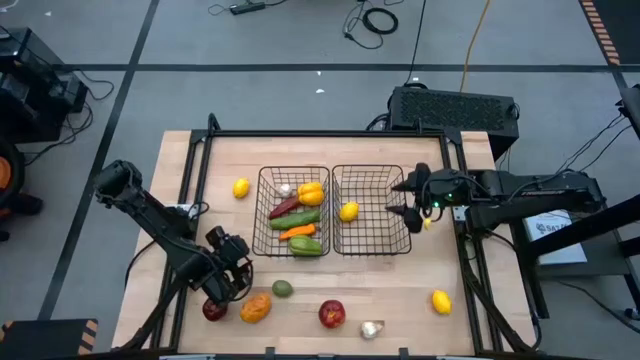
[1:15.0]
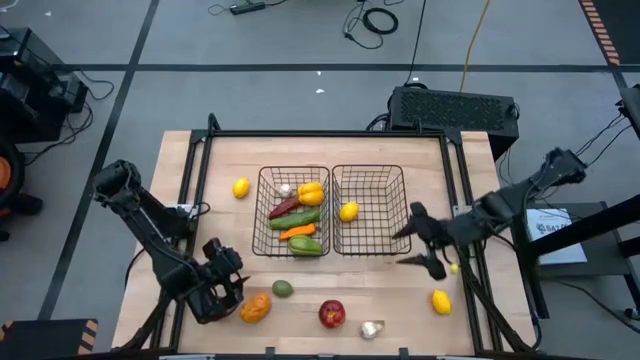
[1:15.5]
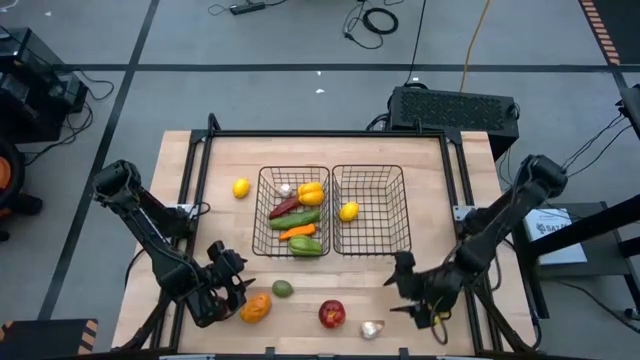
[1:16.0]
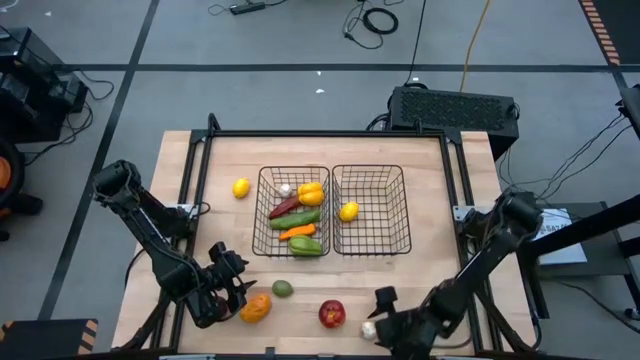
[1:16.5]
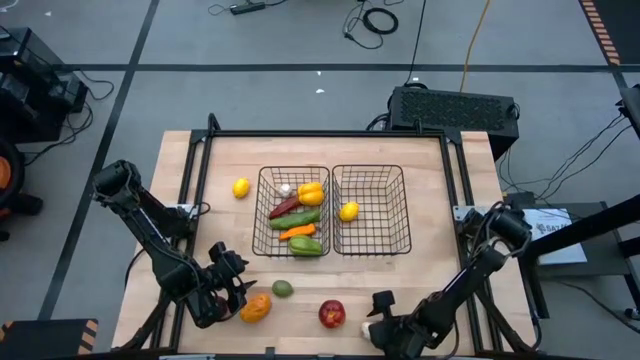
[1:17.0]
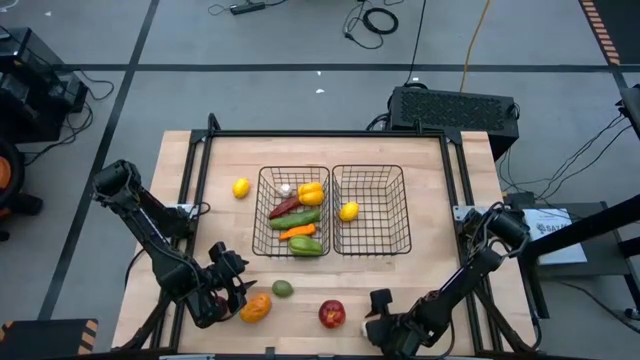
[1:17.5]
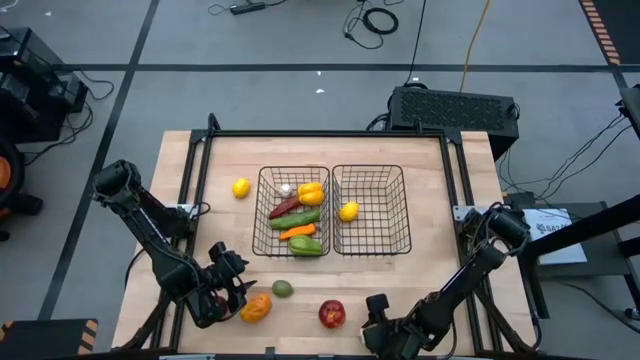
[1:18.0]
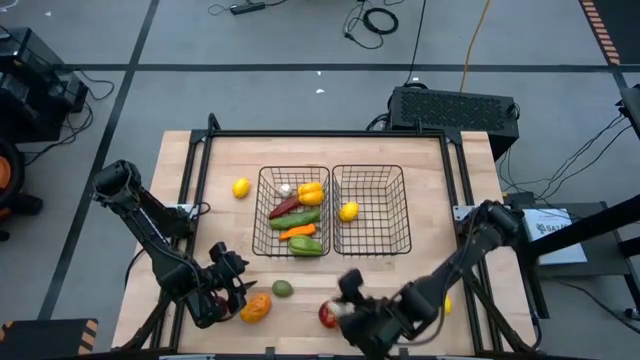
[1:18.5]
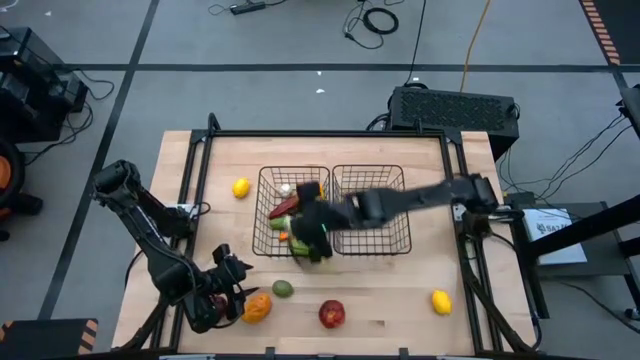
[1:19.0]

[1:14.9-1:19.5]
Task: Sort produce into baskets
Put the white garlic into the left black wire basket

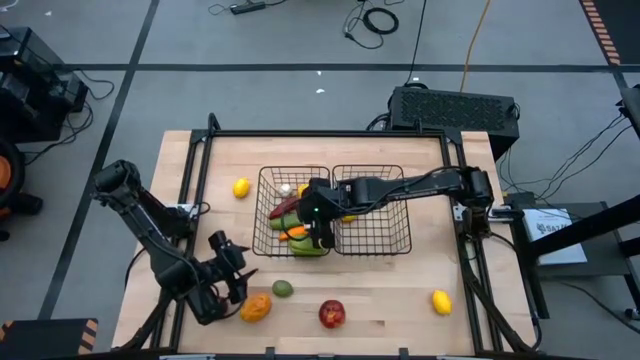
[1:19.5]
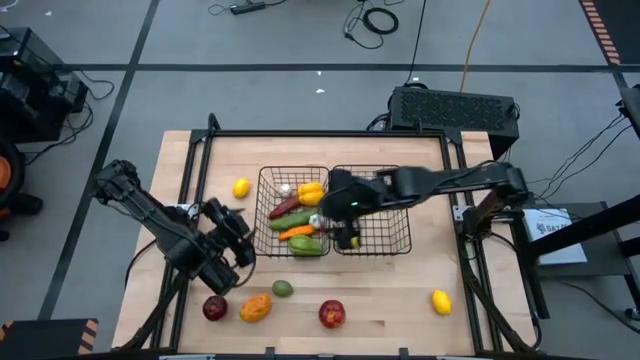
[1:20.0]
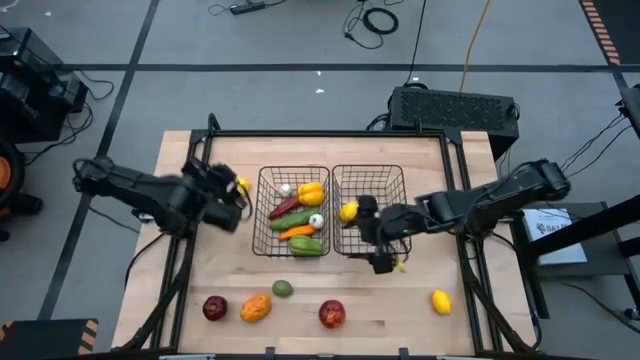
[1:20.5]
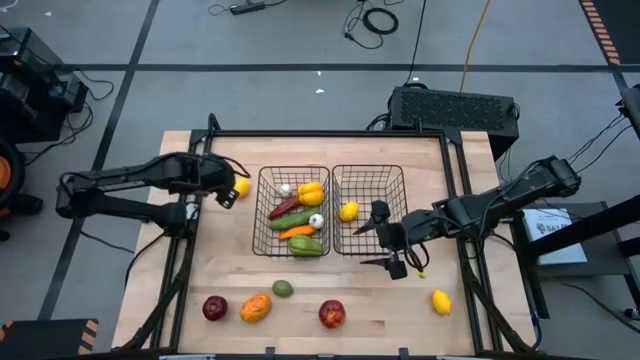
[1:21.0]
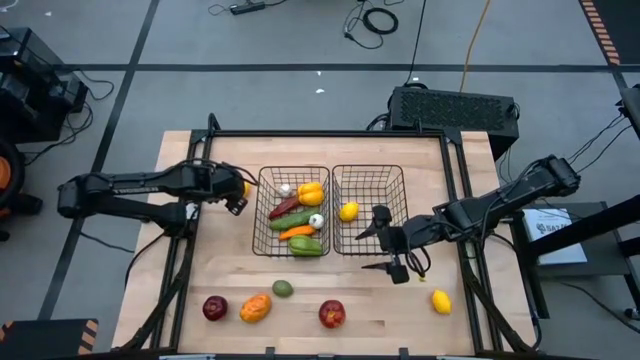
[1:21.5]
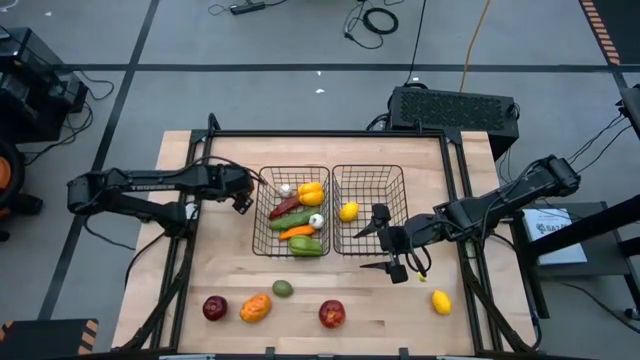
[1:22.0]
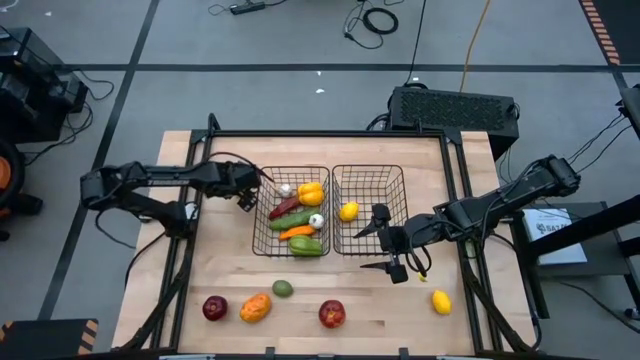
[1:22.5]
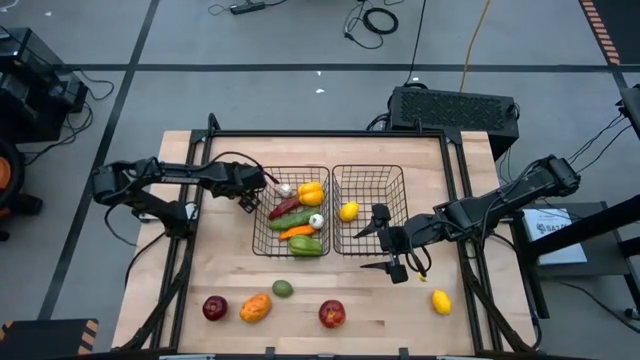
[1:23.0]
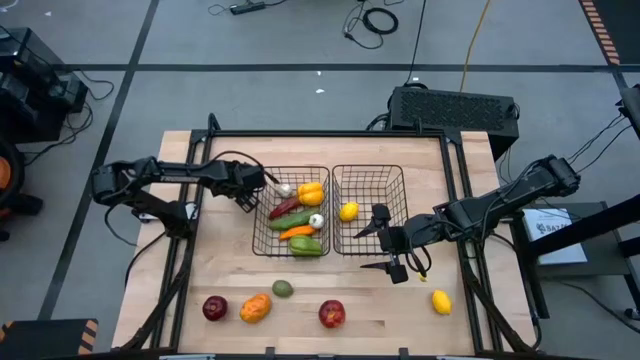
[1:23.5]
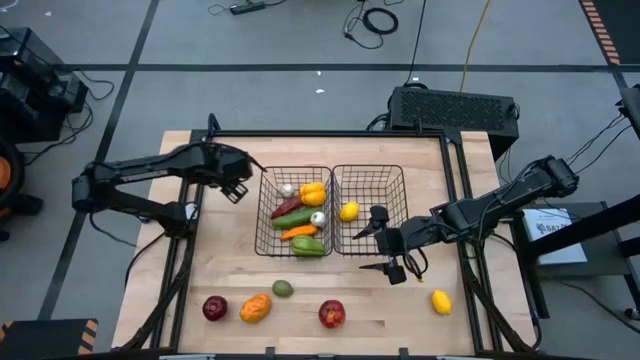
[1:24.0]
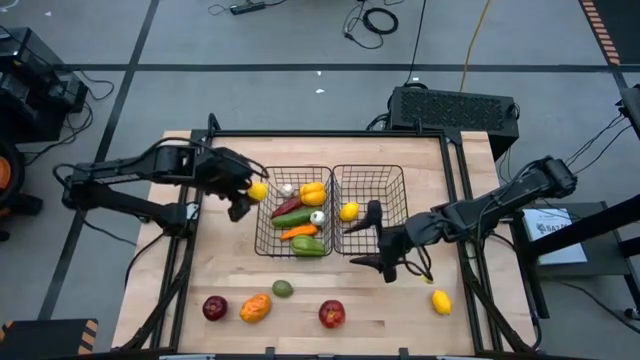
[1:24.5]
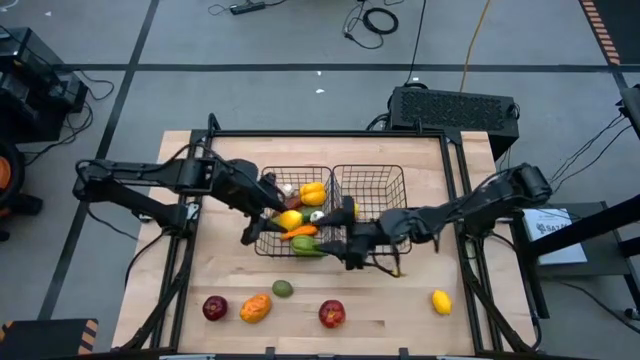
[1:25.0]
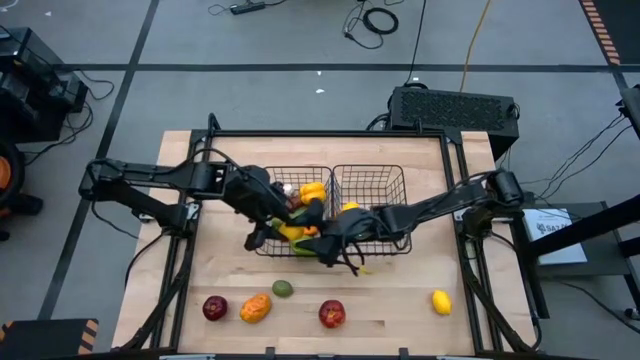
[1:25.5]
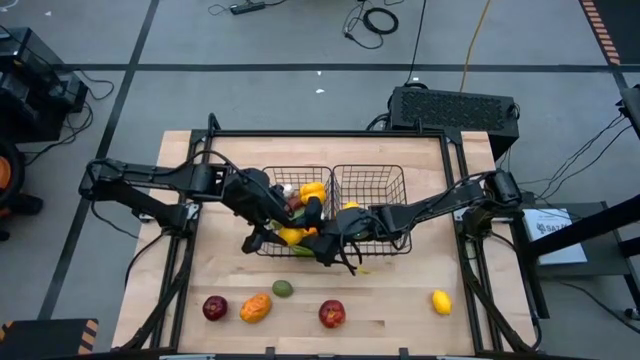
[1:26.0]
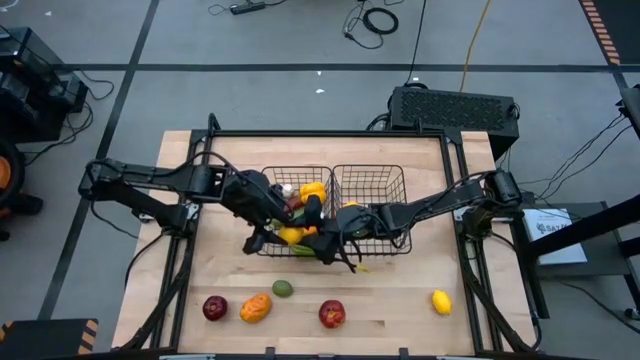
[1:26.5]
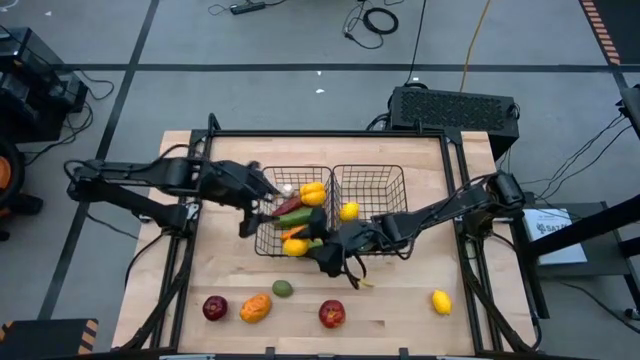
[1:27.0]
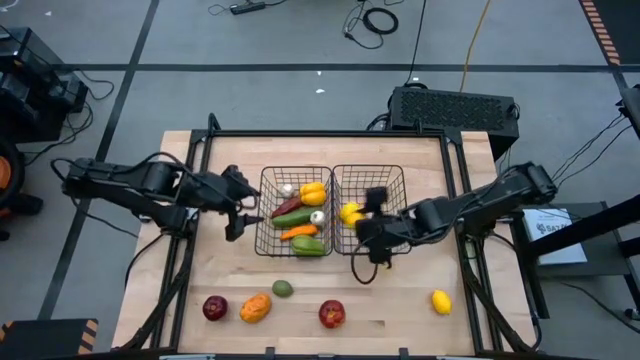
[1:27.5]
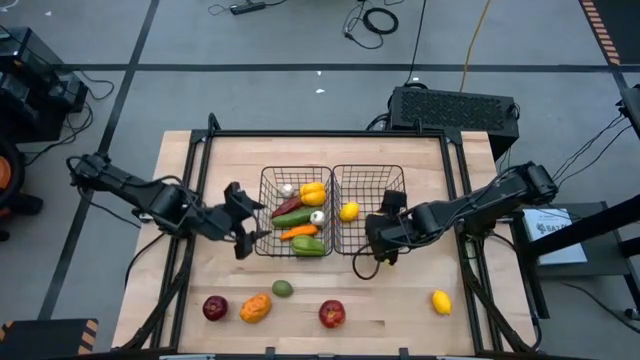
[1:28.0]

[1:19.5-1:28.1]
Put the left yellow lemon into the right black wire basket

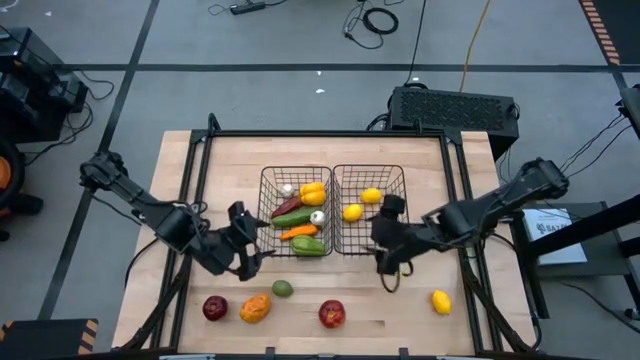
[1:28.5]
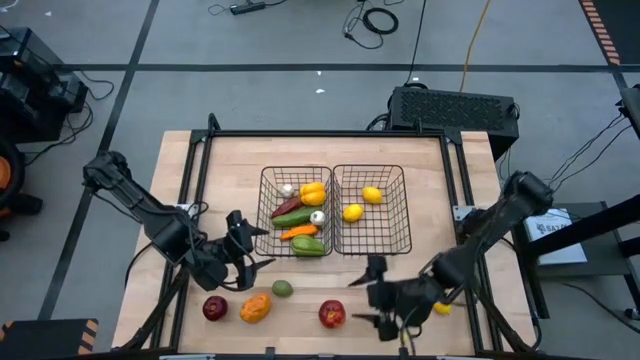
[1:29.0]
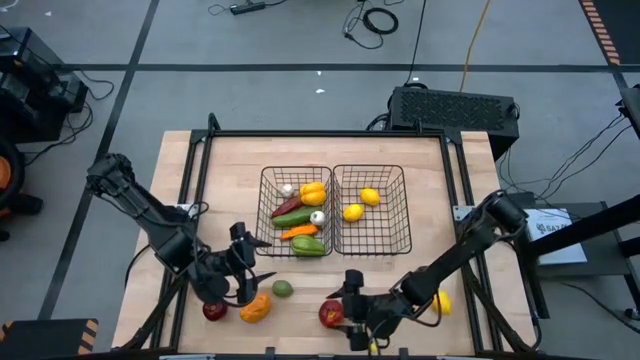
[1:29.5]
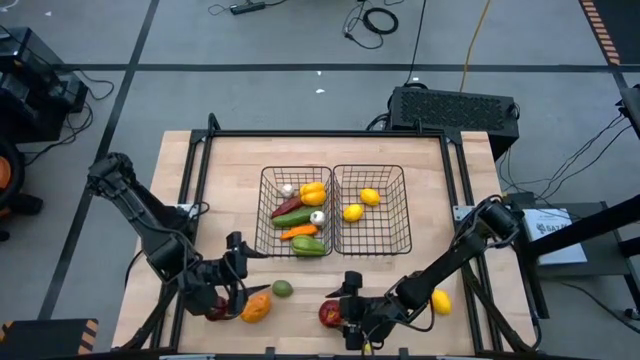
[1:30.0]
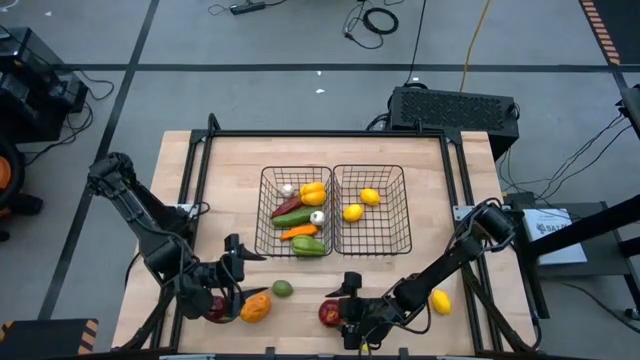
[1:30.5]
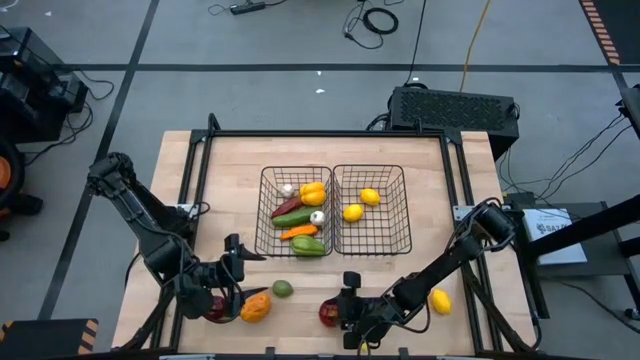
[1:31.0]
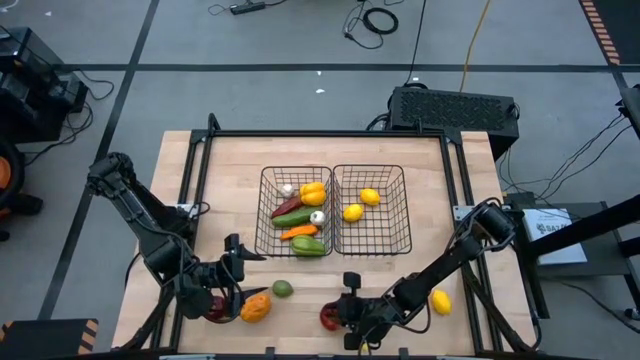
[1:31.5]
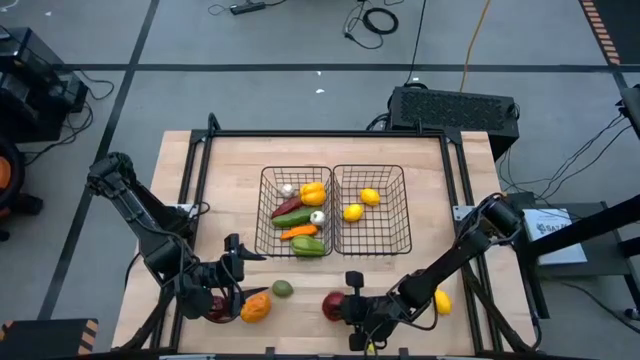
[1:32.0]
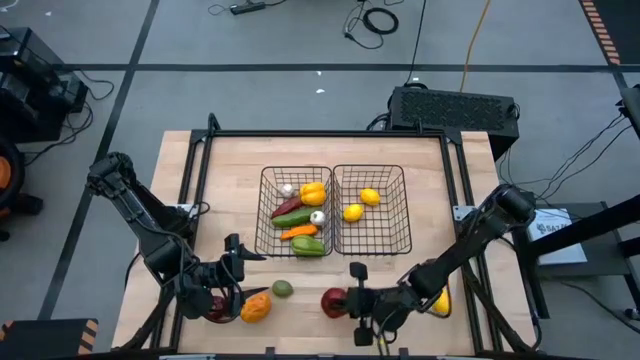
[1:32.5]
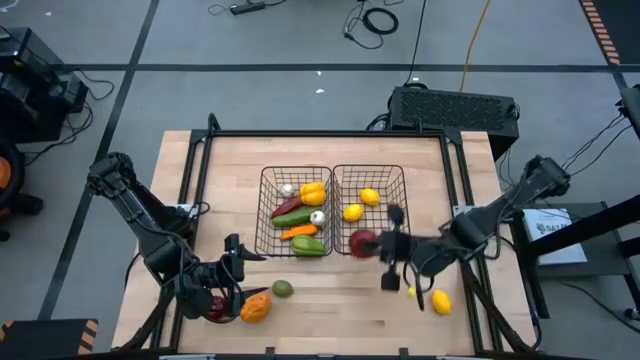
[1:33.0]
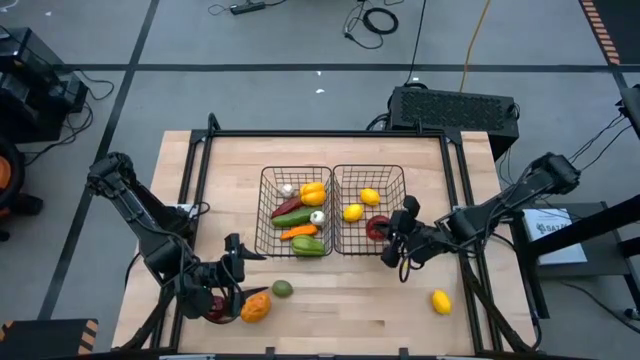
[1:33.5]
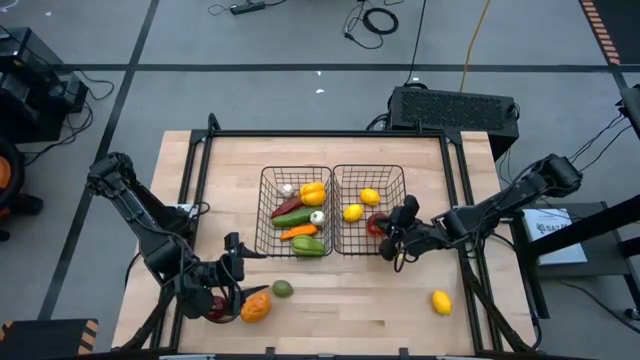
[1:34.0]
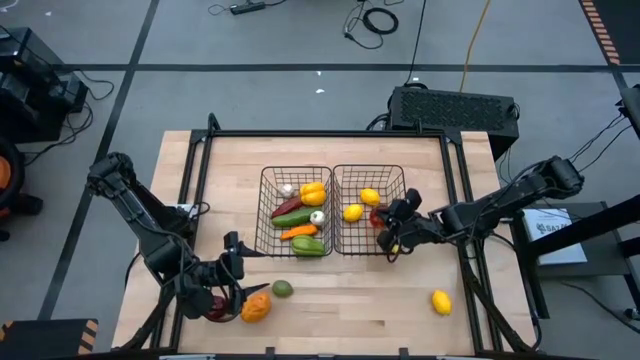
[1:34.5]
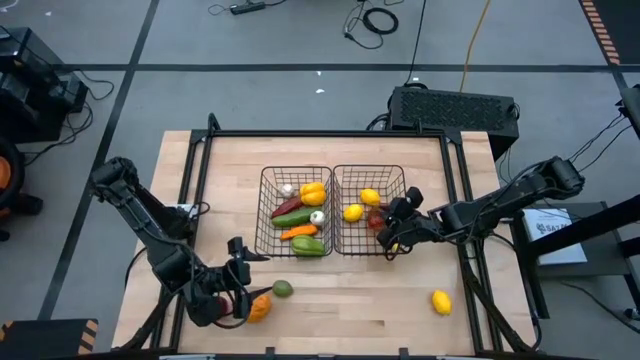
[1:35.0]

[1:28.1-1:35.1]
Put the right red apple into the right black wire basket
